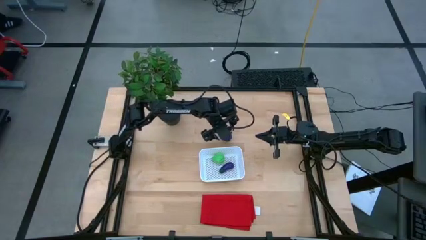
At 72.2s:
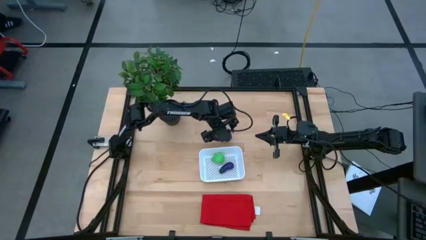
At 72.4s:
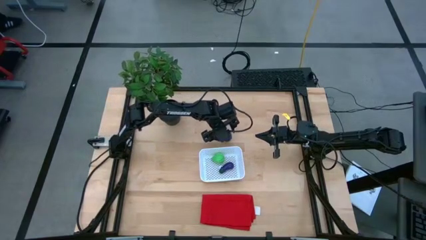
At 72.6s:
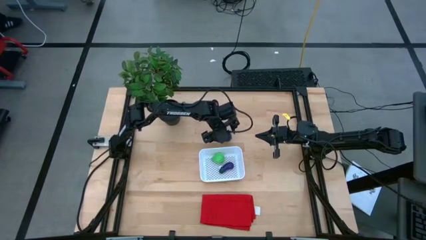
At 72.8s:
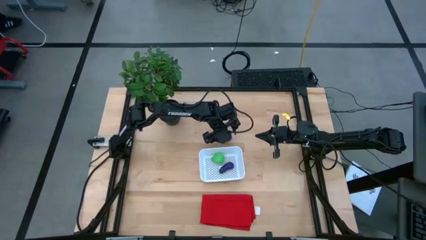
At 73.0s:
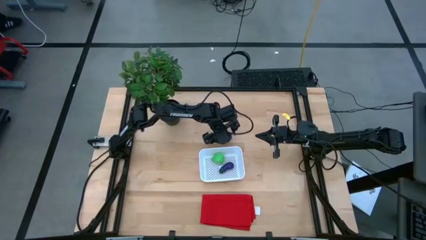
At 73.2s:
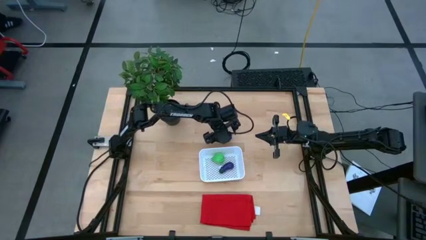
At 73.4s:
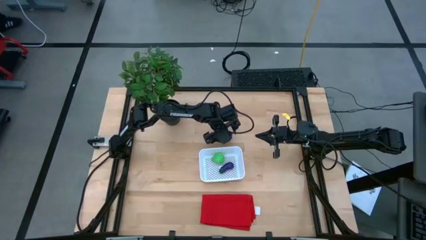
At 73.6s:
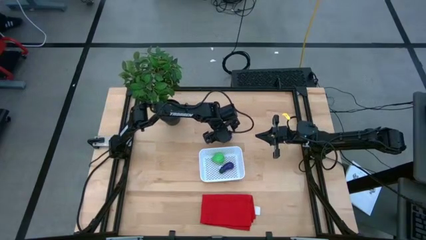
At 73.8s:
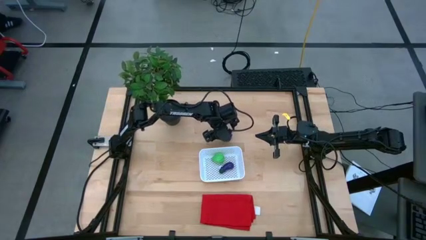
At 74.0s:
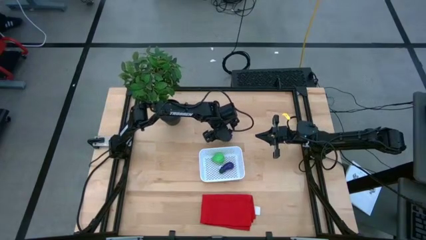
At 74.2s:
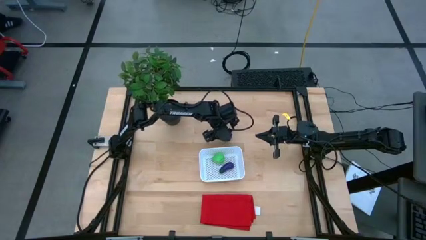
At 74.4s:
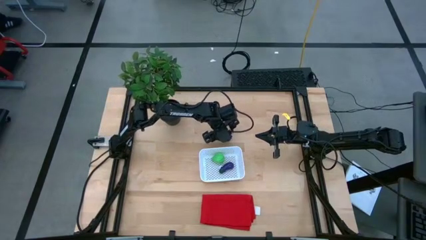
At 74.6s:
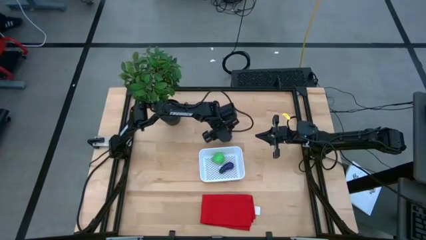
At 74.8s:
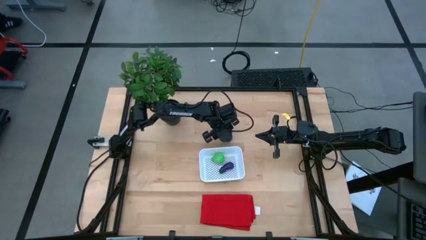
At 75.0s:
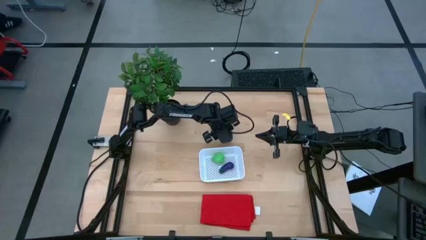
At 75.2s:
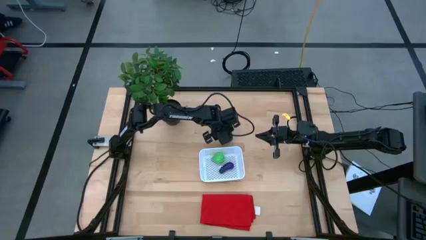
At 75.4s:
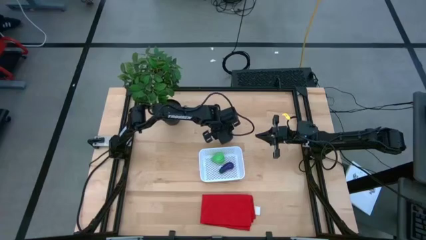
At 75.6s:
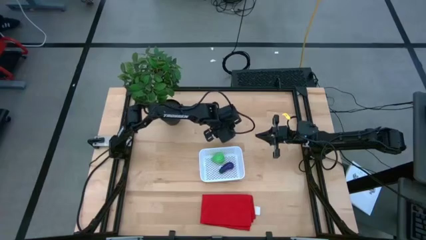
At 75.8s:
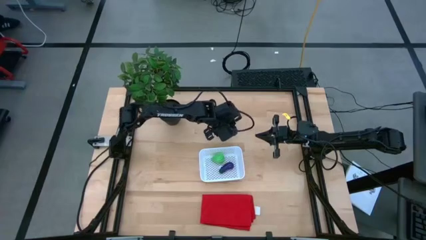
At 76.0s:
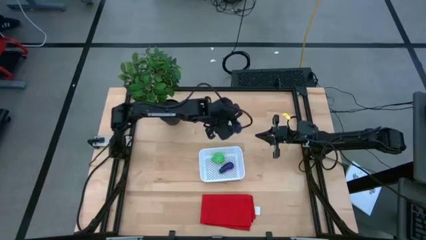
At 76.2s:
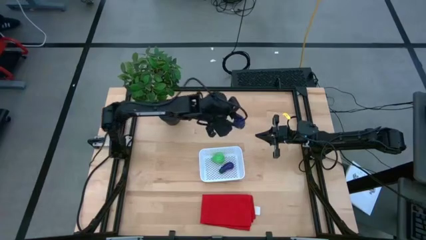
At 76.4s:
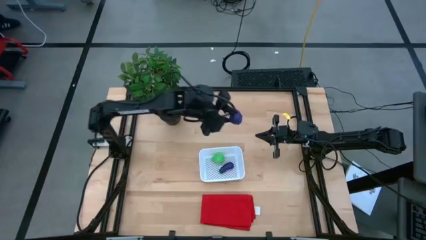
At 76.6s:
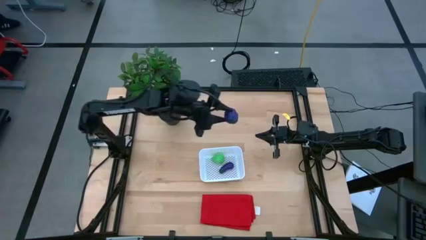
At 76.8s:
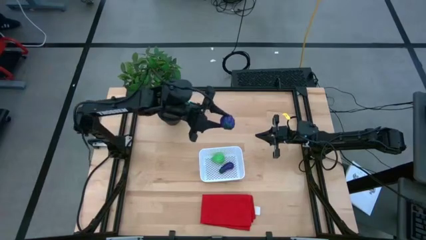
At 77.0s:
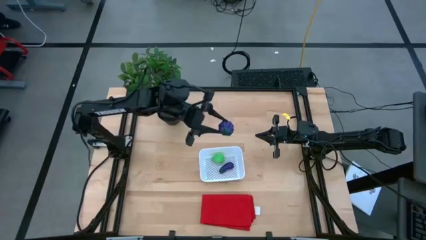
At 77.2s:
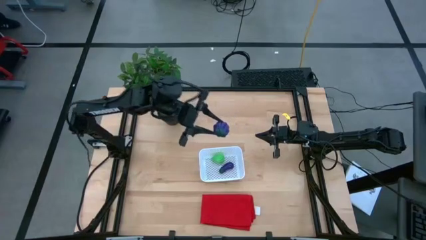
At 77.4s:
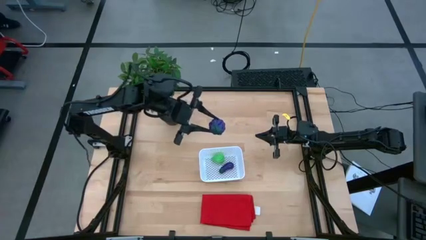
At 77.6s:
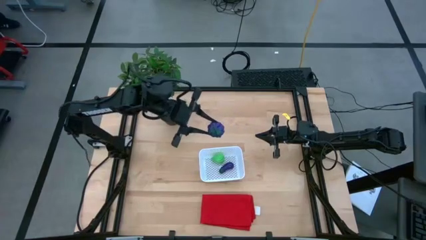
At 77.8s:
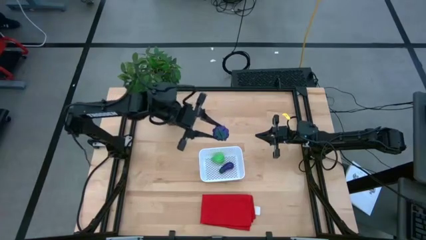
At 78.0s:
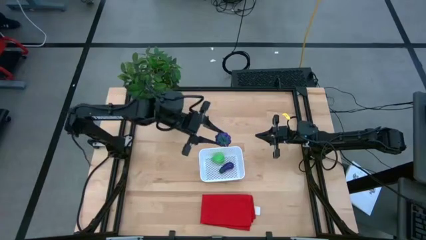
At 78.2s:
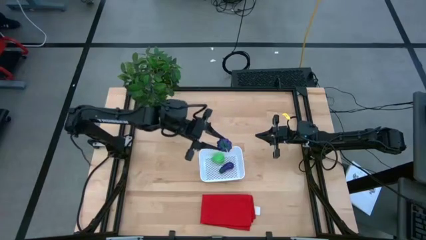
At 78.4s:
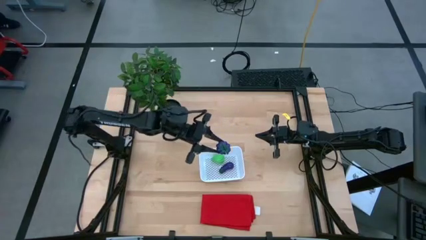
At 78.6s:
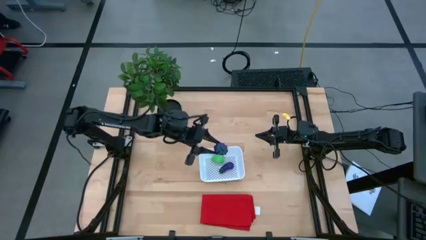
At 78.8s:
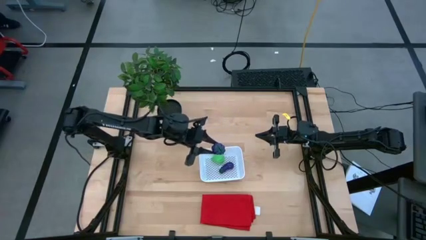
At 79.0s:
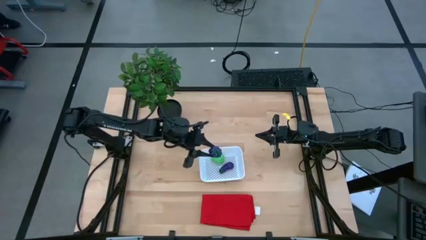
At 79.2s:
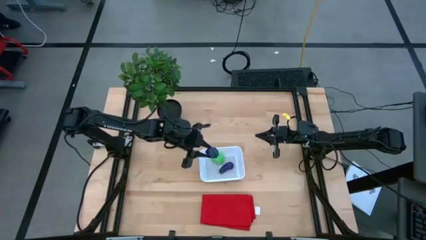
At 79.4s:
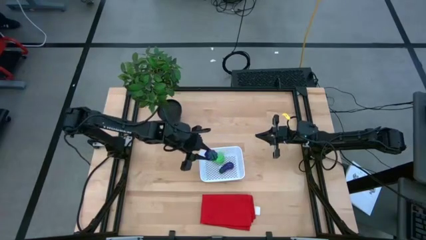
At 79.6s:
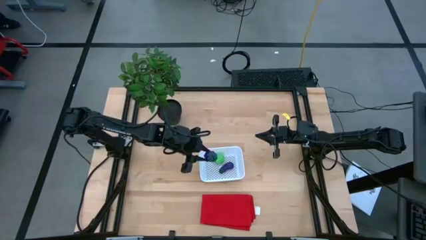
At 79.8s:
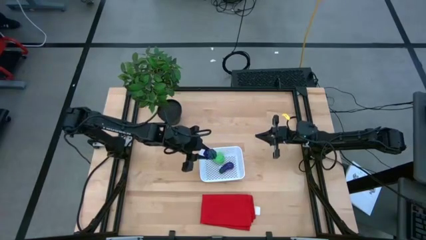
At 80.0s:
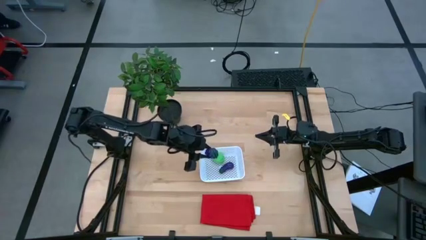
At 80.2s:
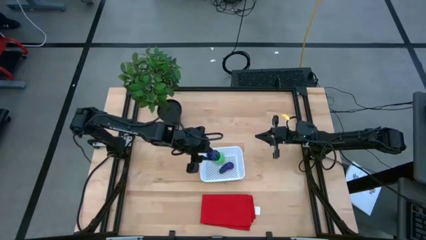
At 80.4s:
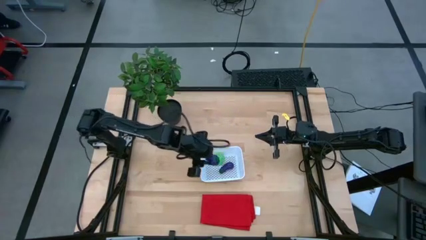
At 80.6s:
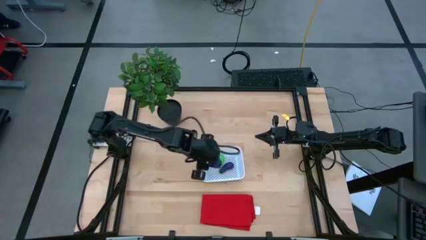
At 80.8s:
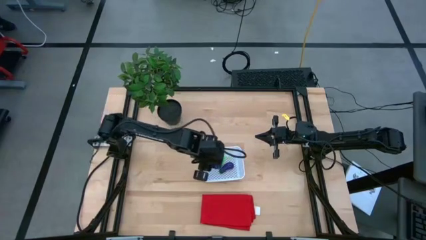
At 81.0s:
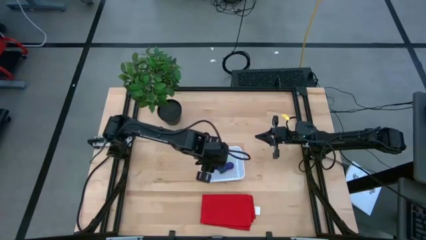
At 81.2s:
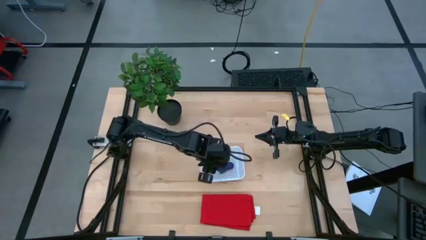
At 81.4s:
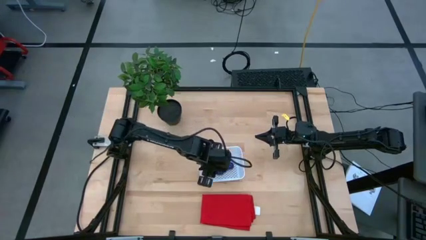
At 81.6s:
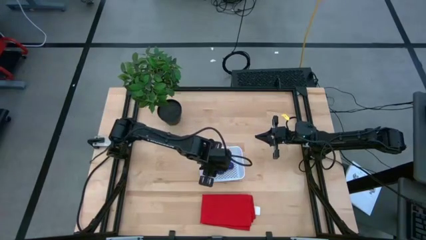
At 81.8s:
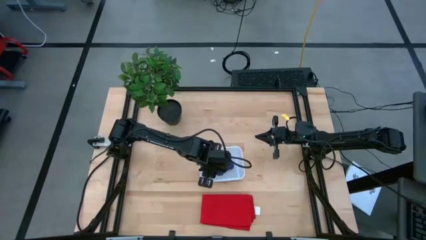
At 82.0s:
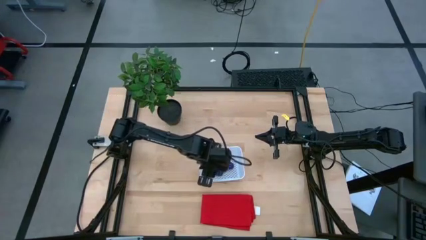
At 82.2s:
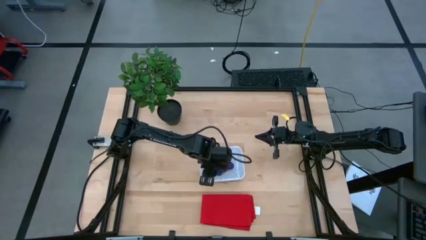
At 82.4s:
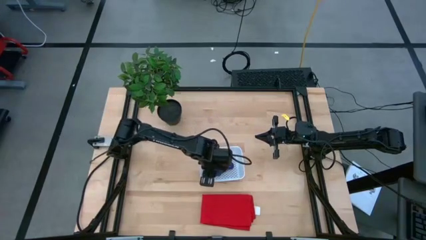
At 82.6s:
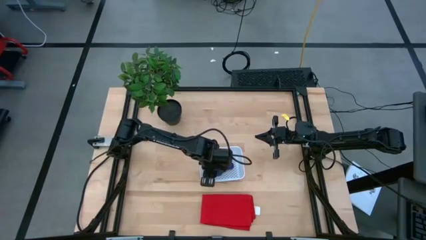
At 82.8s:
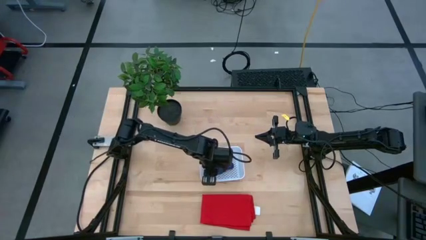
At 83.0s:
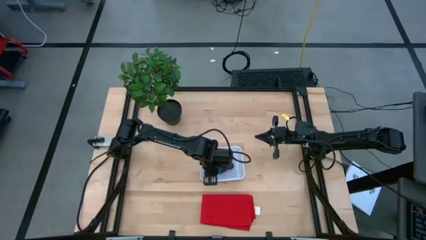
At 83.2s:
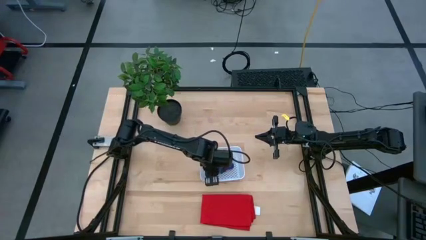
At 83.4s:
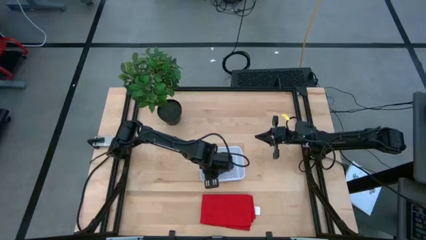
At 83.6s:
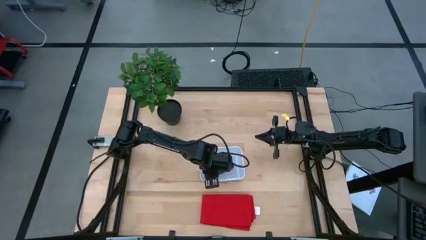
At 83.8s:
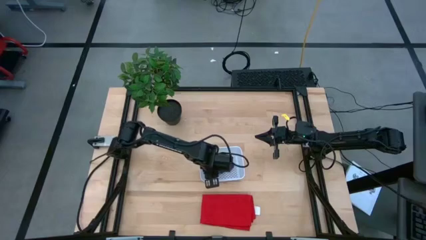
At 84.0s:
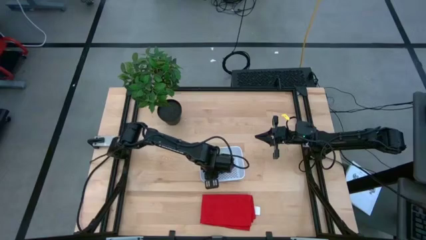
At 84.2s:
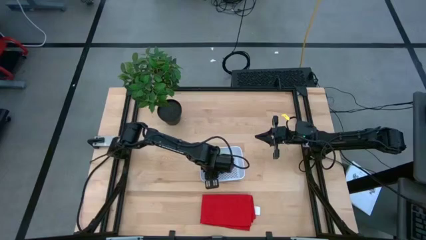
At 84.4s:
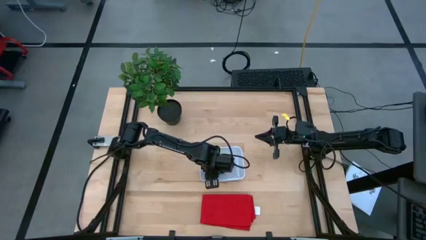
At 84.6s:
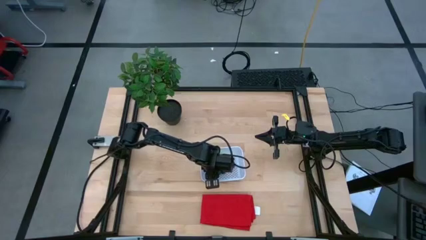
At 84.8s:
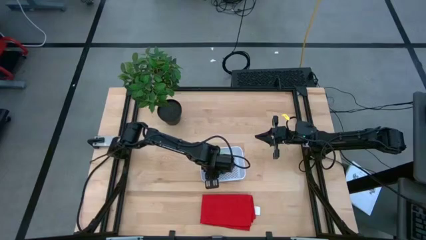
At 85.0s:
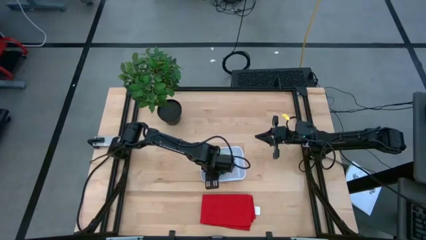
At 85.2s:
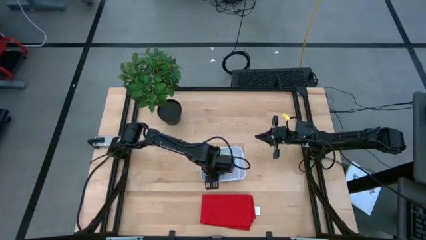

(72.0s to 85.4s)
Task: Pick and placing Produce into tupperware
Put the violet grape into the white bin
